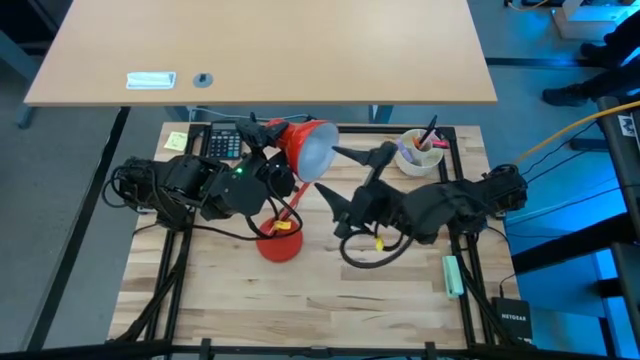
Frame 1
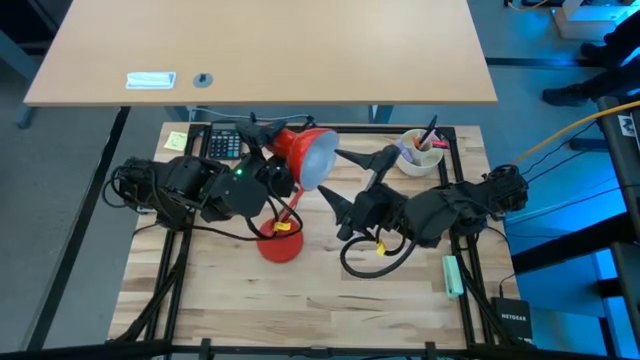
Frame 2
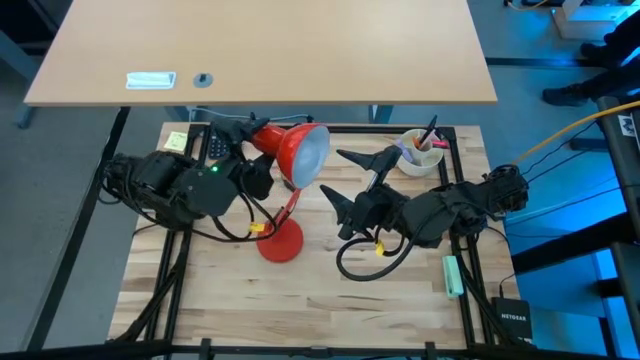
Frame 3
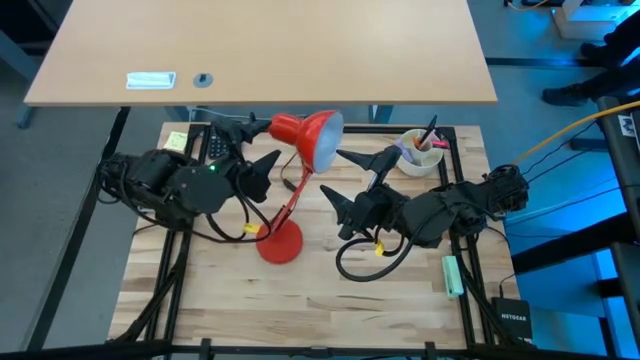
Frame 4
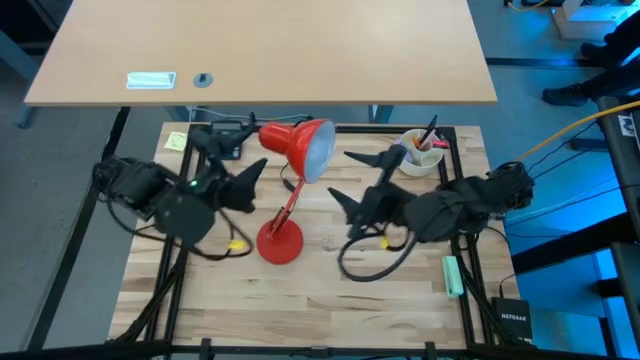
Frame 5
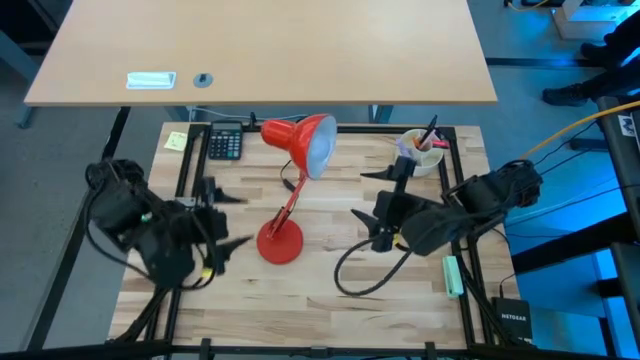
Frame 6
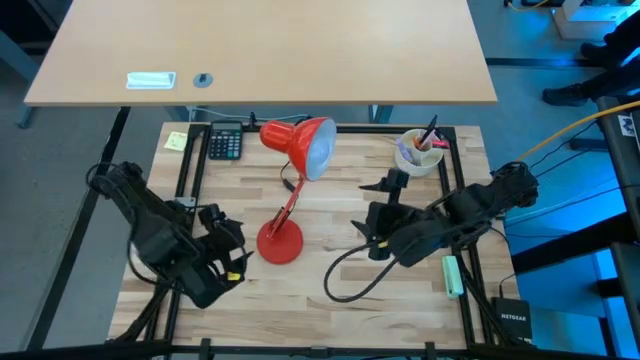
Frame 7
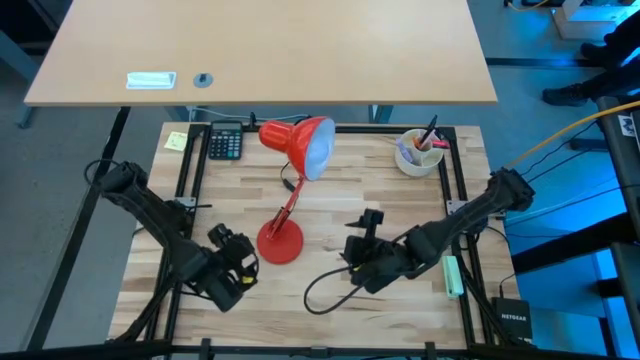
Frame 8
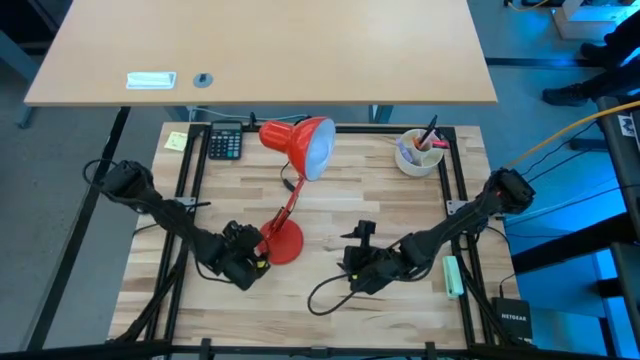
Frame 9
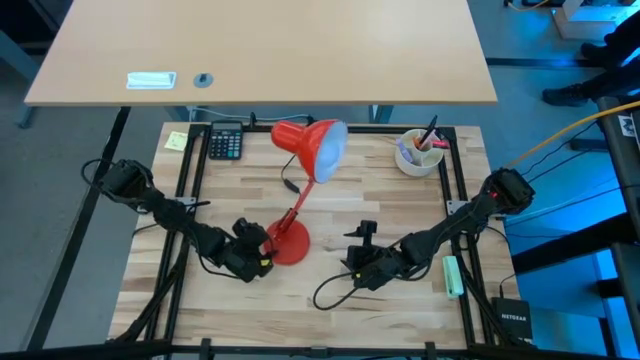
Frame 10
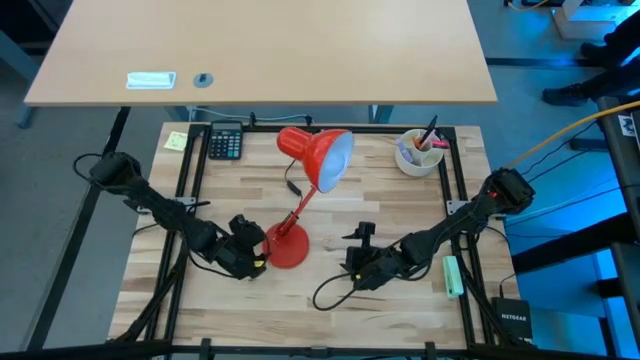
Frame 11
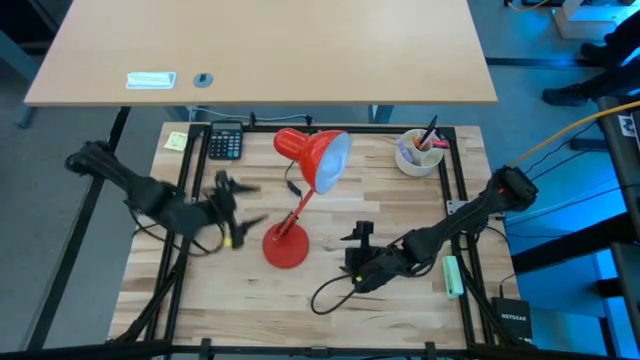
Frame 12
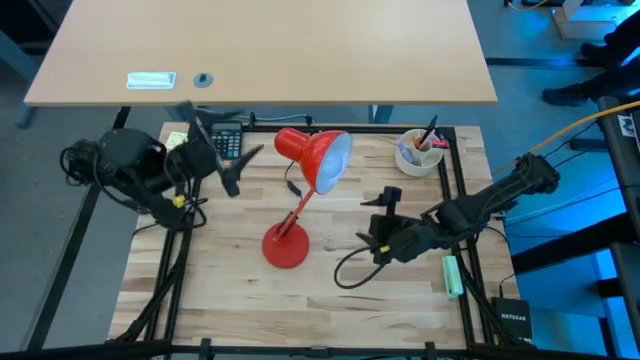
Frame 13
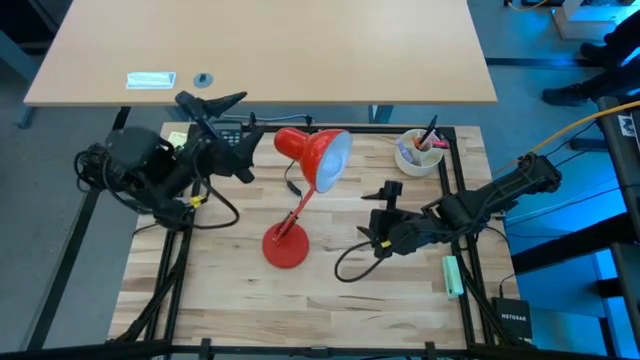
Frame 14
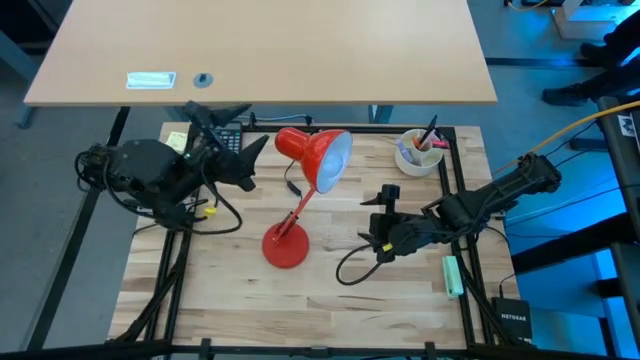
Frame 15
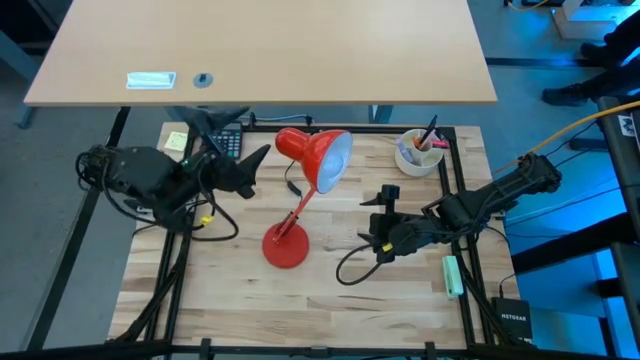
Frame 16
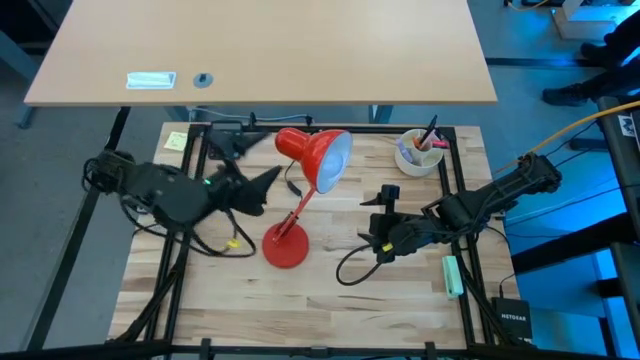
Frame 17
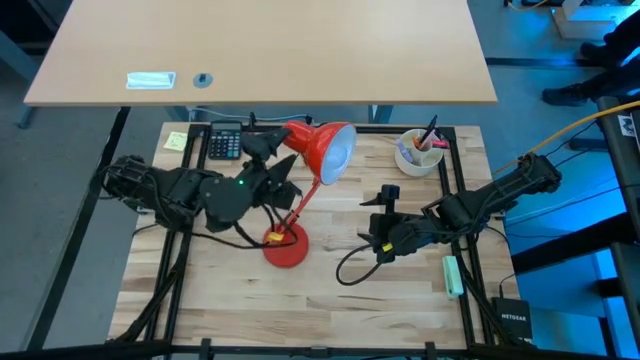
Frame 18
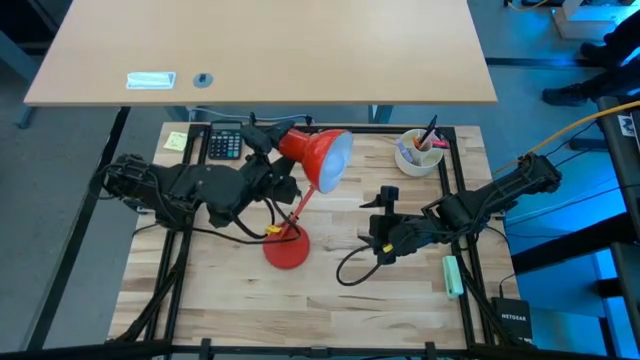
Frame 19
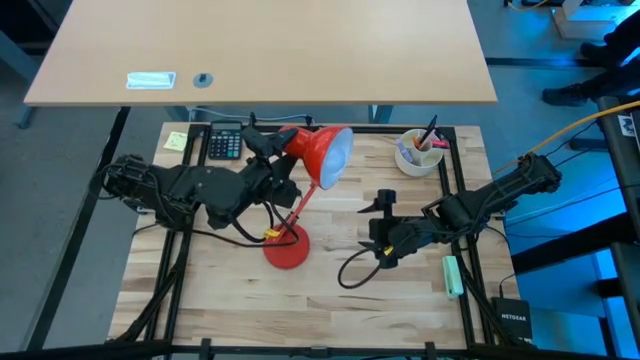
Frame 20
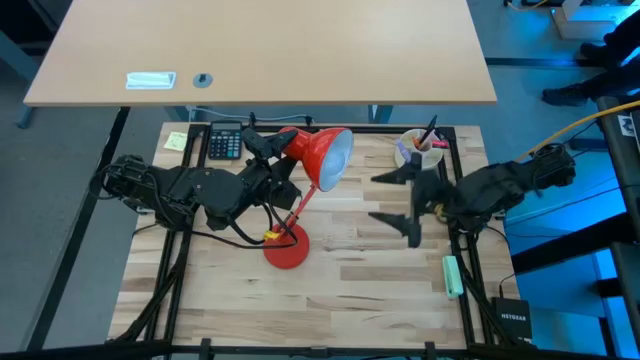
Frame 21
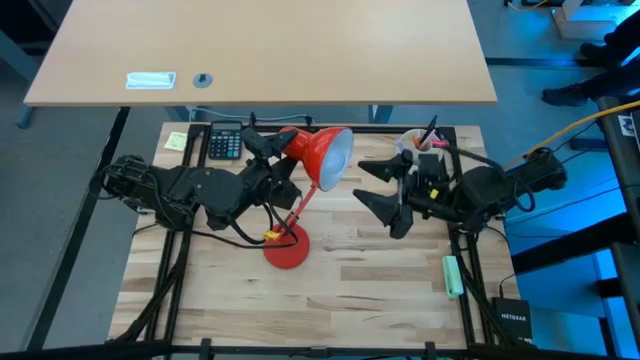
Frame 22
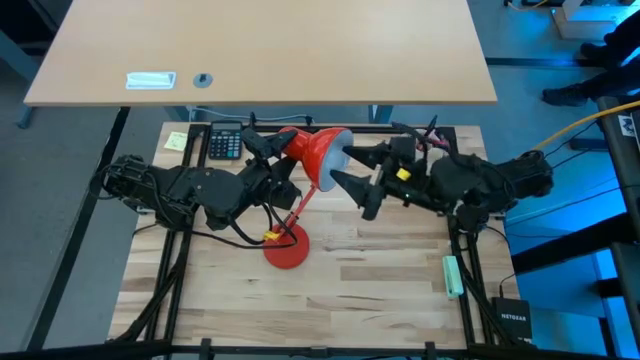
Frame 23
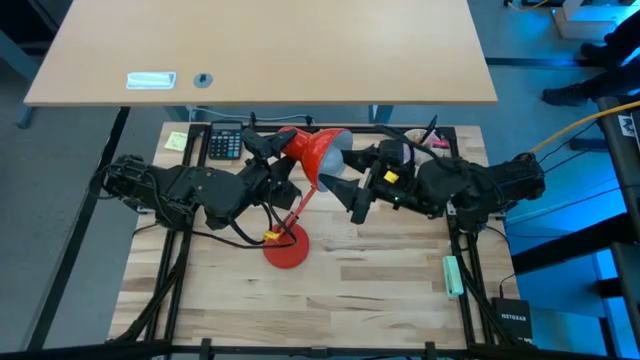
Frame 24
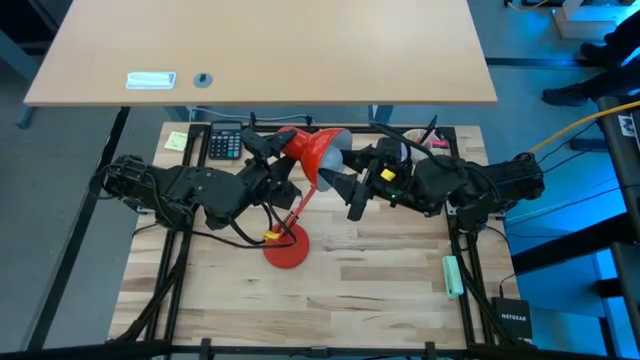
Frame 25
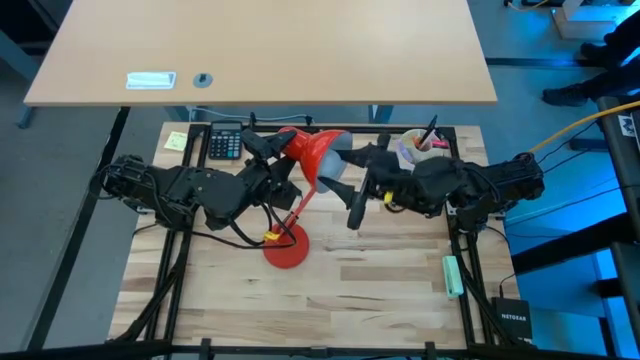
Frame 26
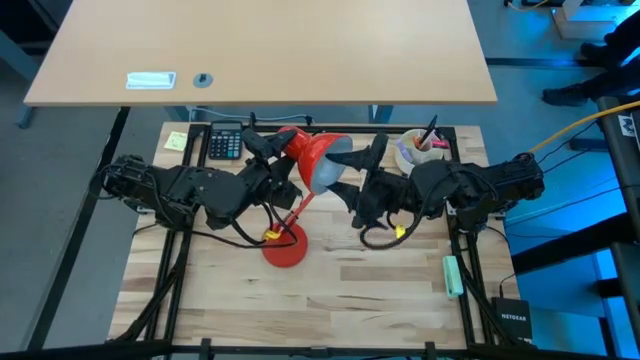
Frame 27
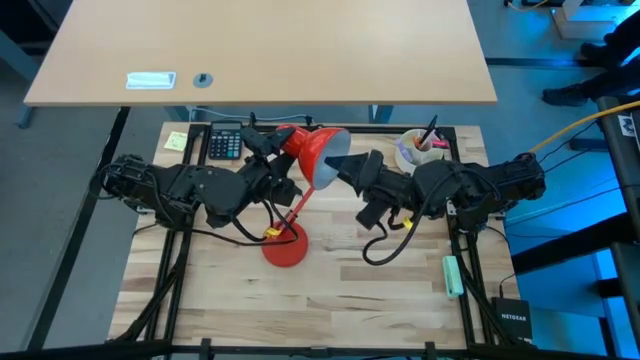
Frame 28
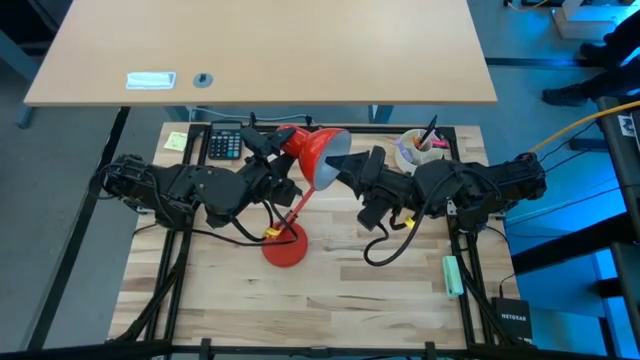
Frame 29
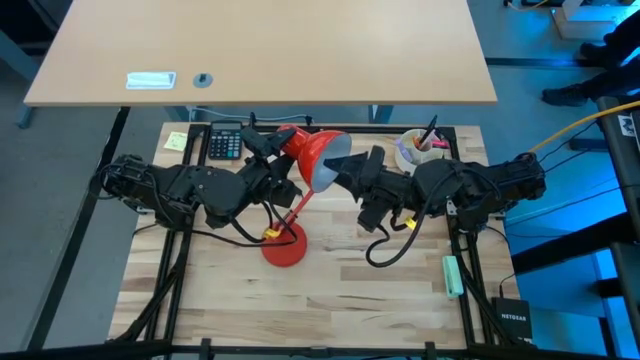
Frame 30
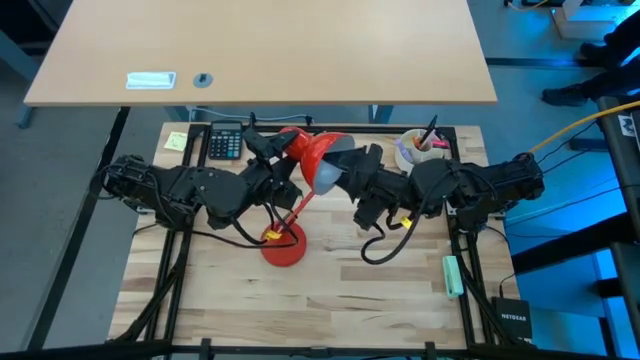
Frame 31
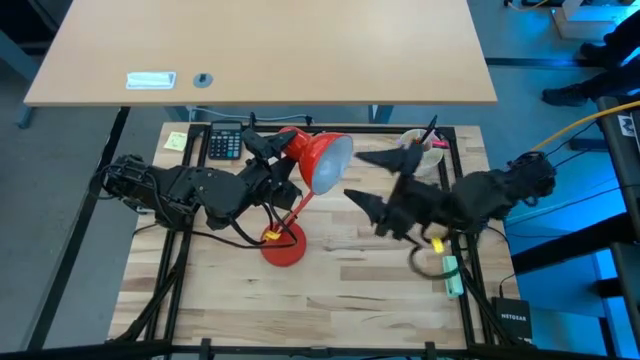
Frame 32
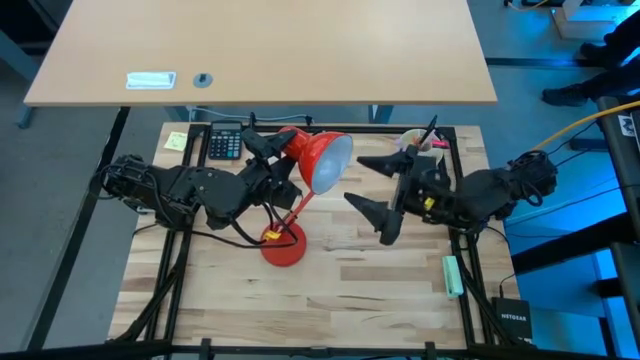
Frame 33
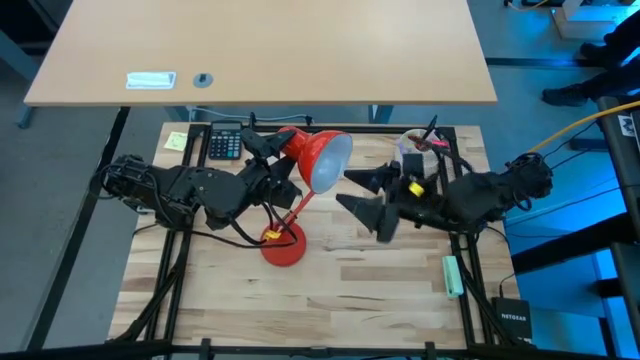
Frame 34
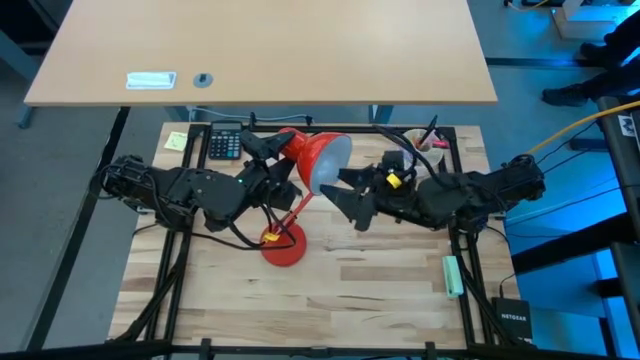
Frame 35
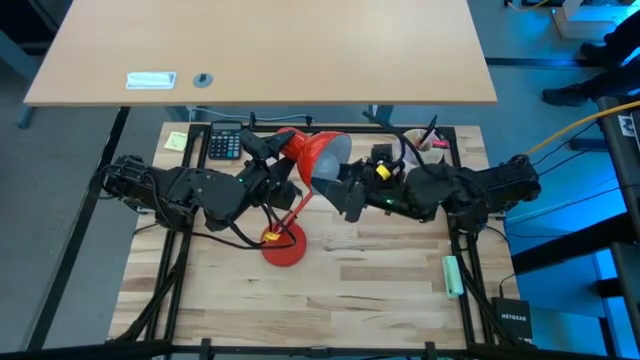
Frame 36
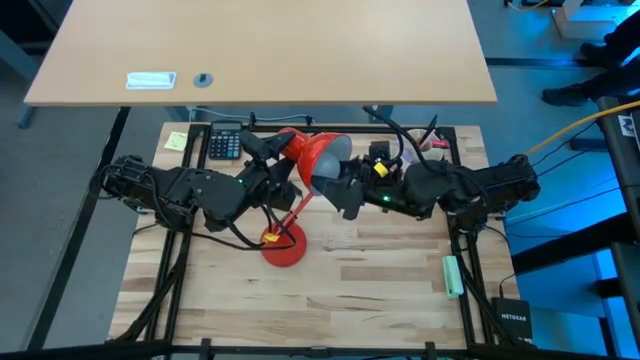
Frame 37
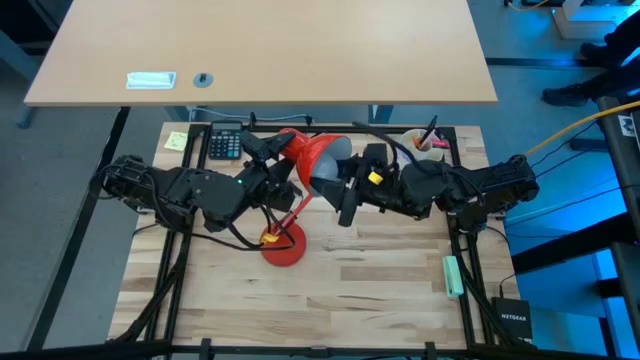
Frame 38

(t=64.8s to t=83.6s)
Task: Screw lightbulb
Remove the light bulb from the lamp

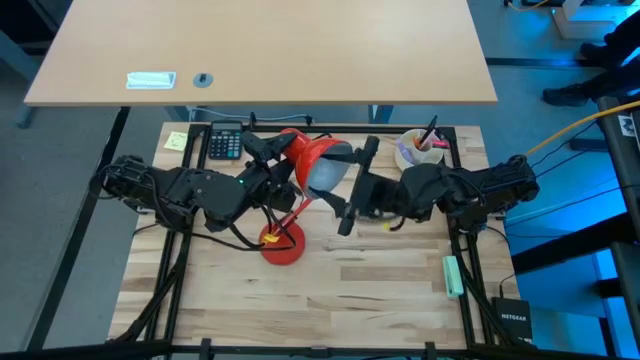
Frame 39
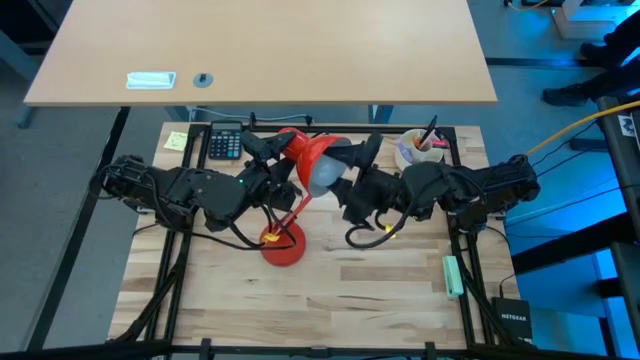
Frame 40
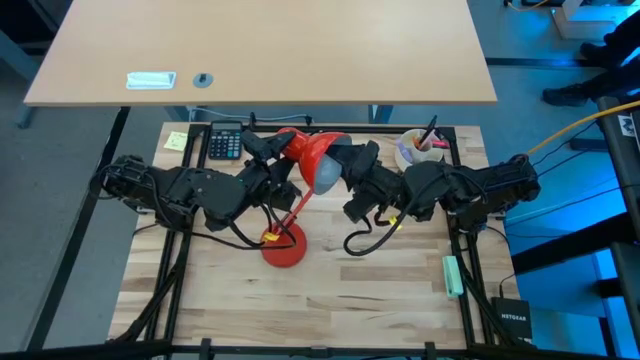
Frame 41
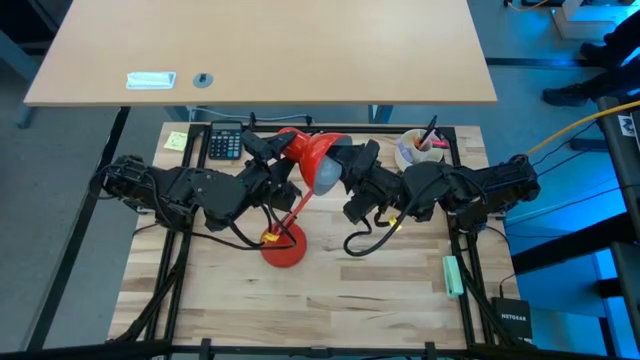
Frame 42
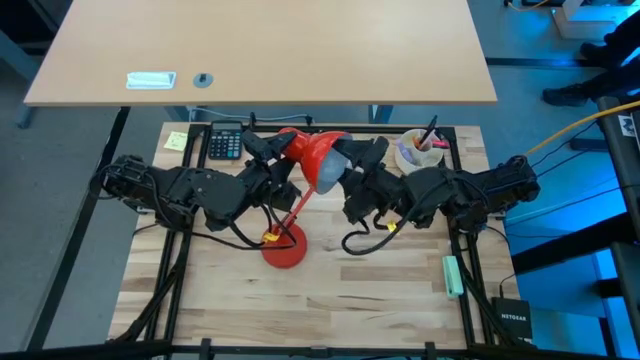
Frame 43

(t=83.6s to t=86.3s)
Remove the light bulb from the lamp
